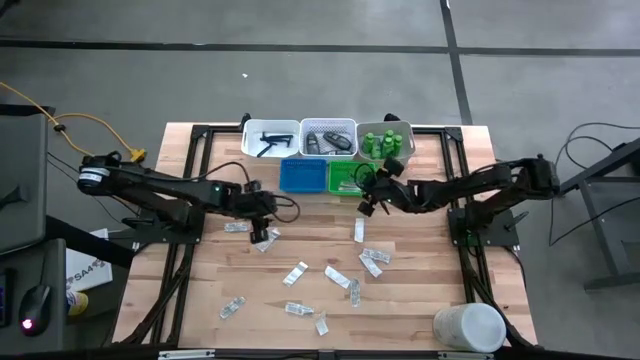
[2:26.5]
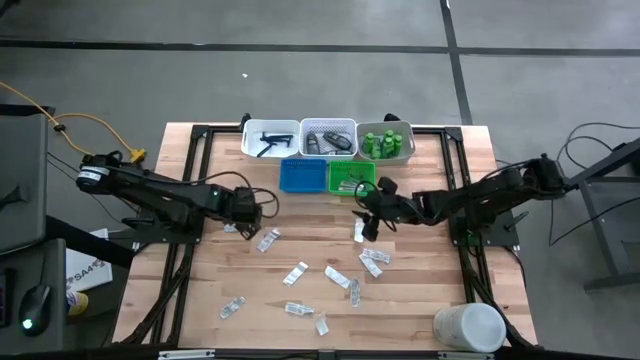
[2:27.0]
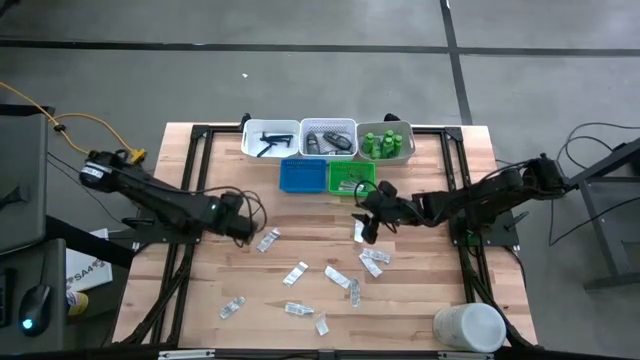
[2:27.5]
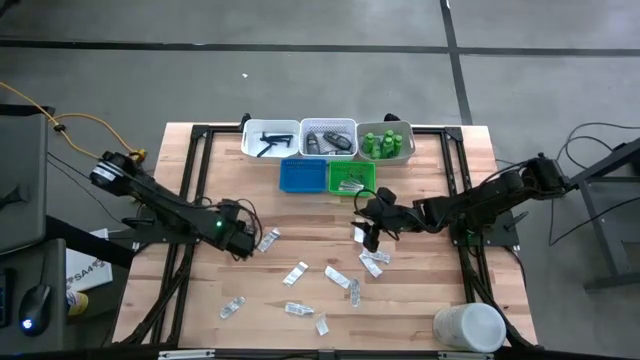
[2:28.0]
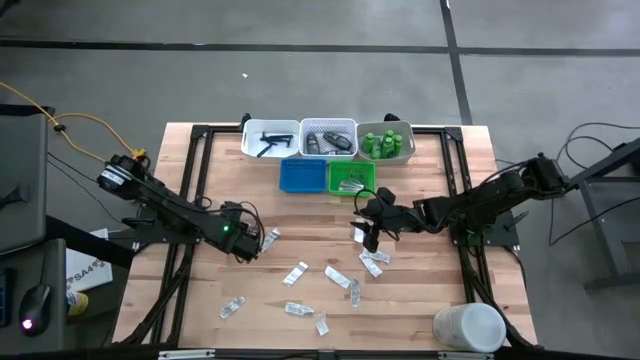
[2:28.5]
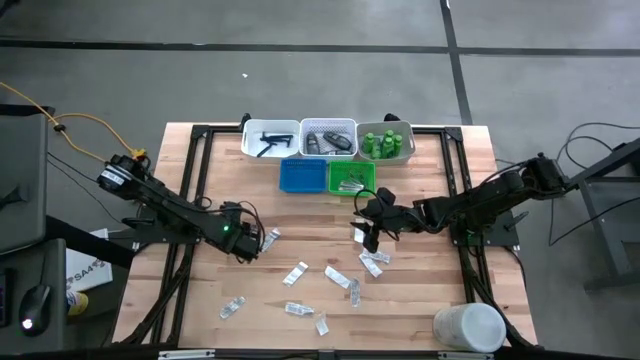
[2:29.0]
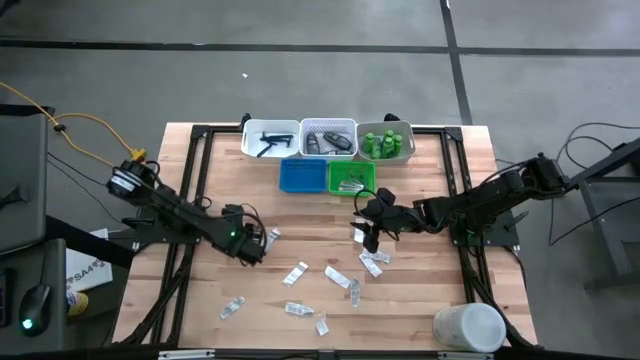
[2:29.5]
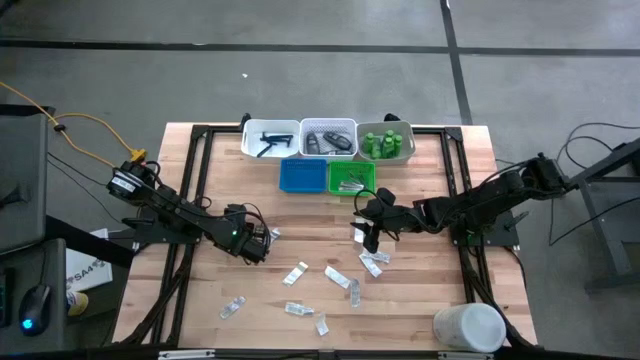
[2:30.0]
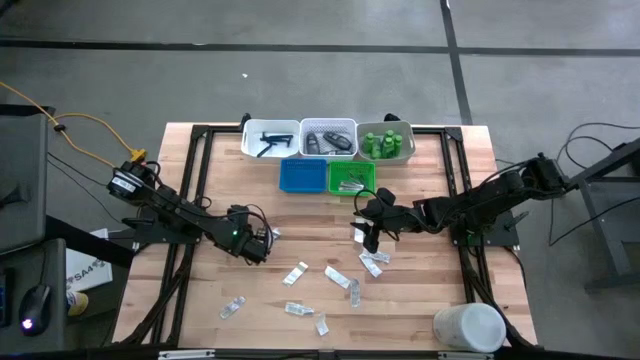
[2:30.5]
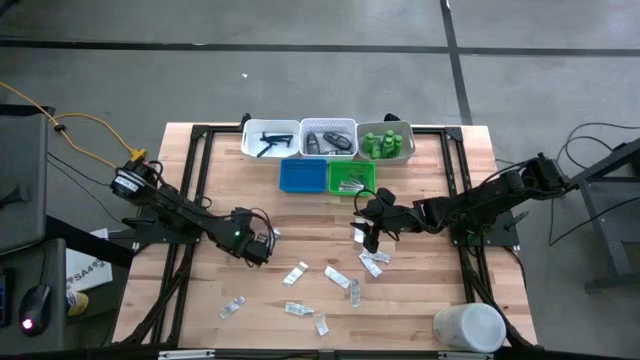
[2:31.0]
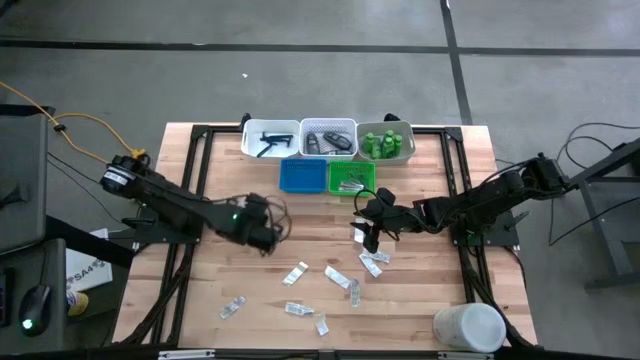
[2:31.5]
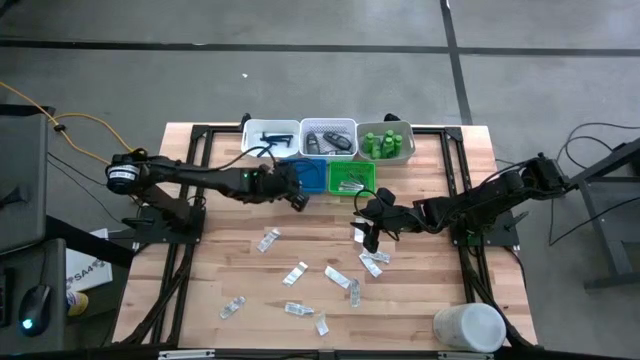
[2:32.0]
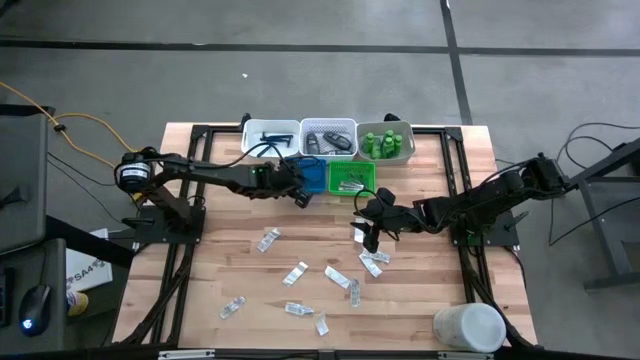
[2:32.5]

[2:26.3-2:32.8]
Task: Pick & Place Travel size toiletries
Put the white bandage pad into the blue basket

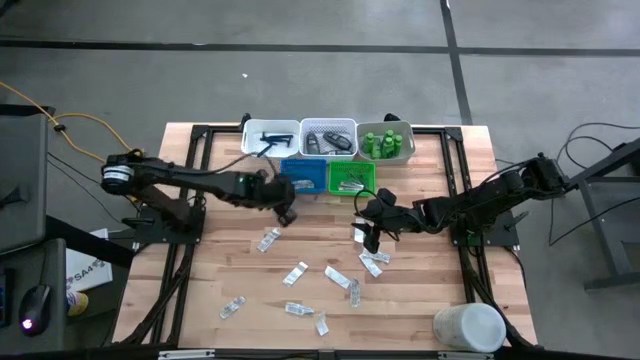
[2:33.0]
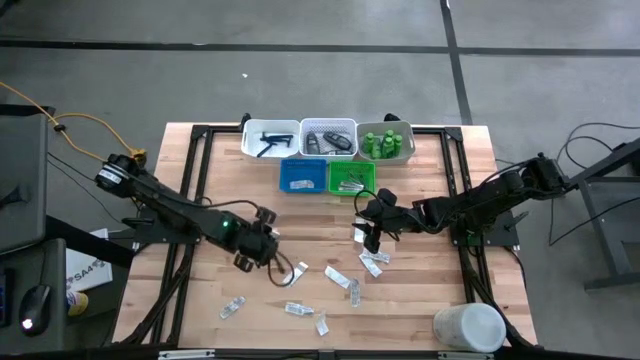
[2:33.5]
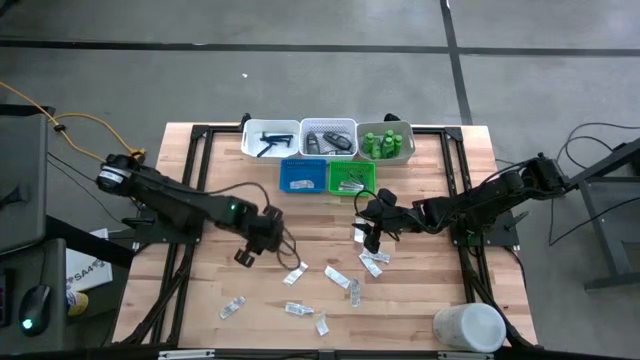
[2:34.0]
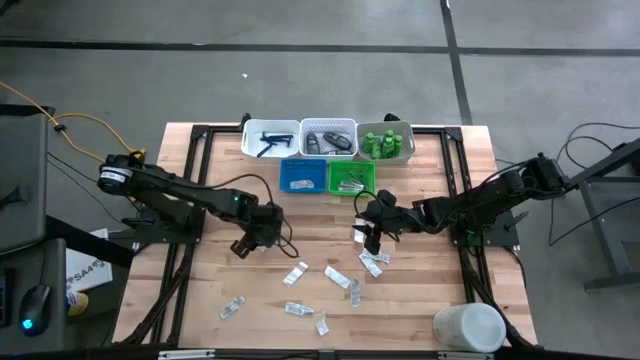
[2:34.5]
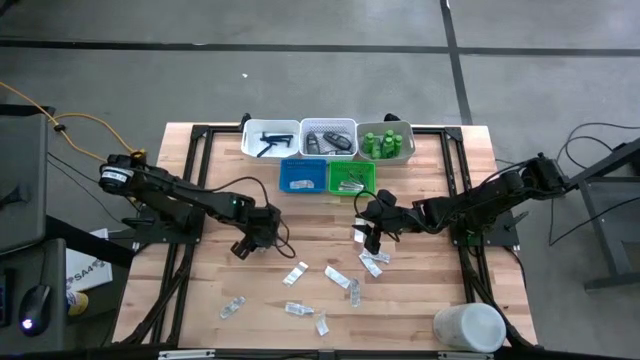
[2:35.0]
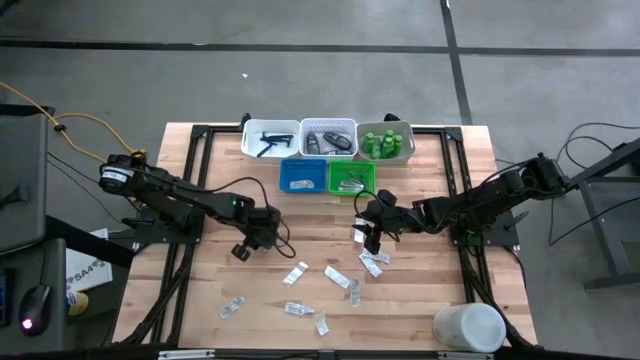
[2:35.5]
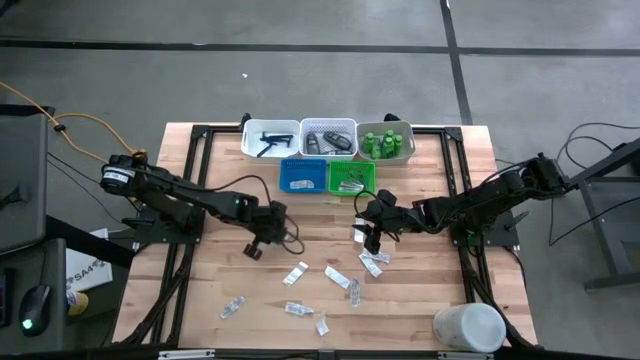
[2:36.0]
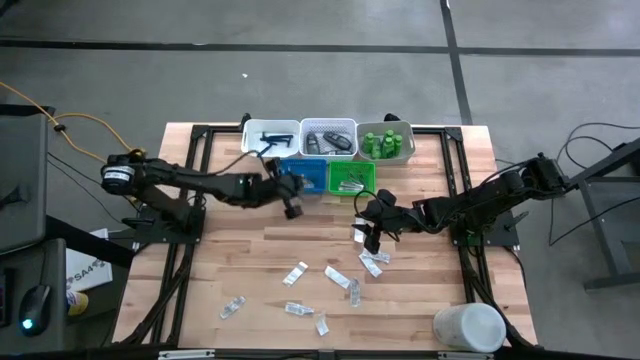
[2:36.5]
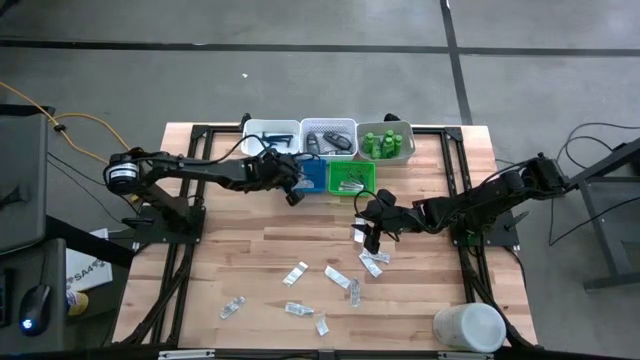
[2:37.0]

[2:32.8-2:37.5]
Put the white bandage pad into the blue basket

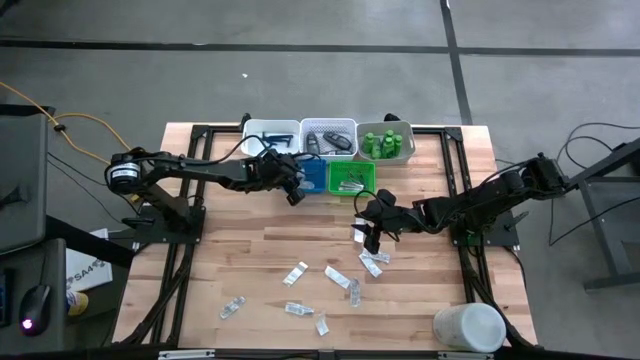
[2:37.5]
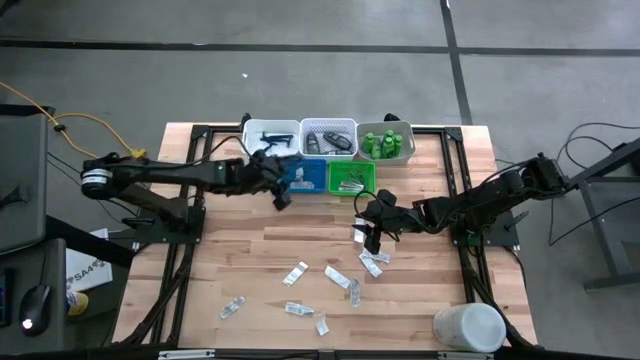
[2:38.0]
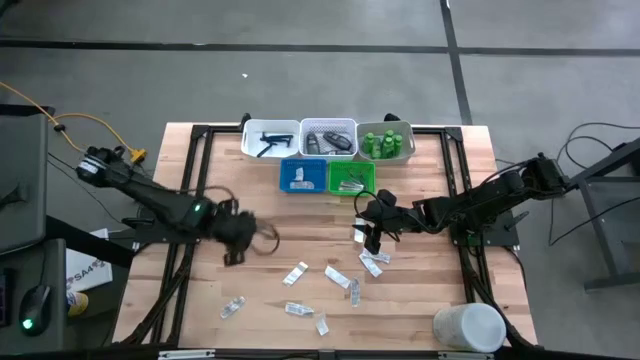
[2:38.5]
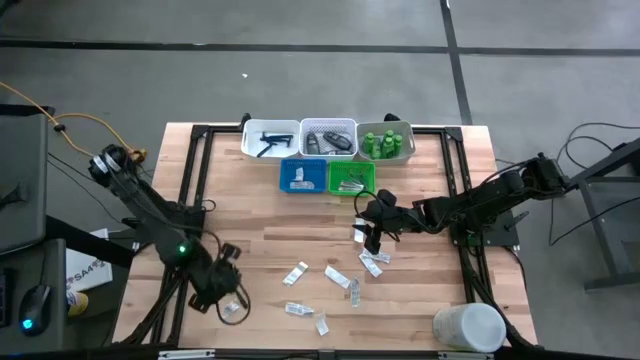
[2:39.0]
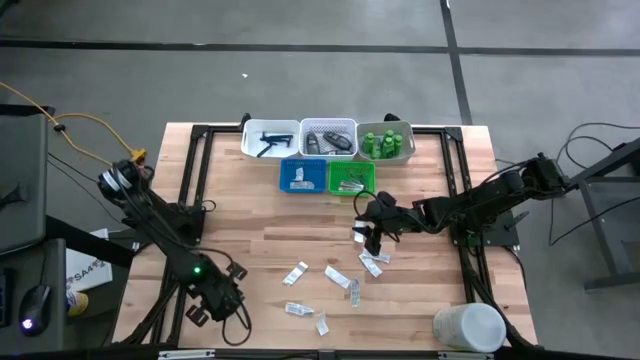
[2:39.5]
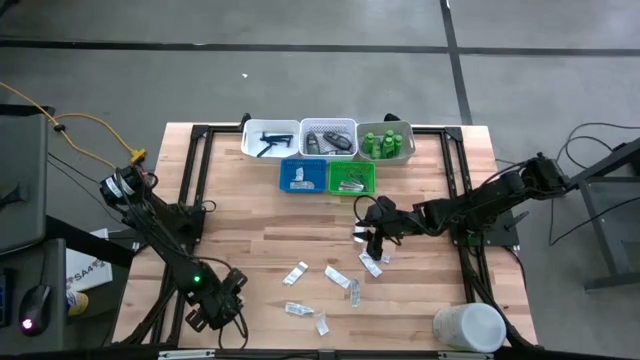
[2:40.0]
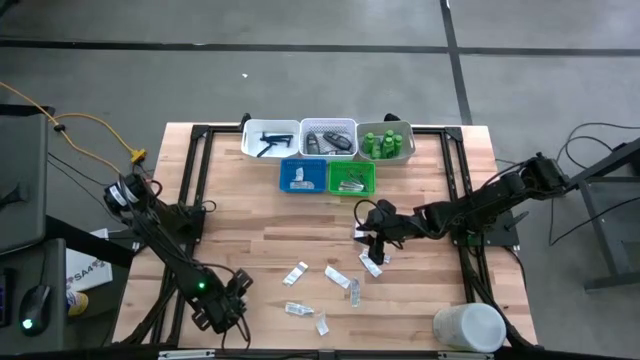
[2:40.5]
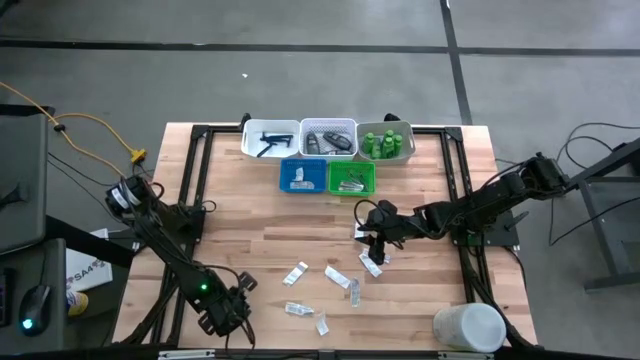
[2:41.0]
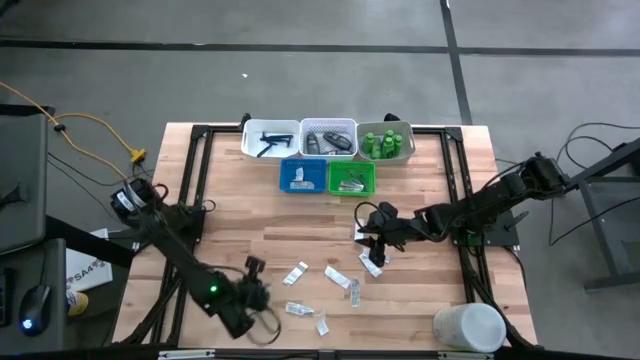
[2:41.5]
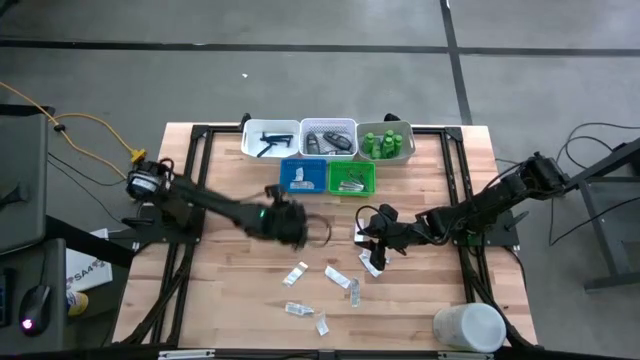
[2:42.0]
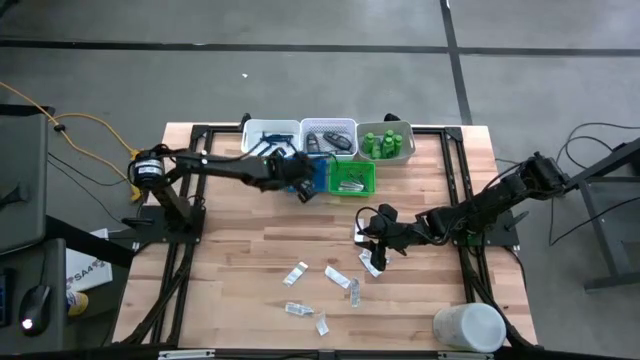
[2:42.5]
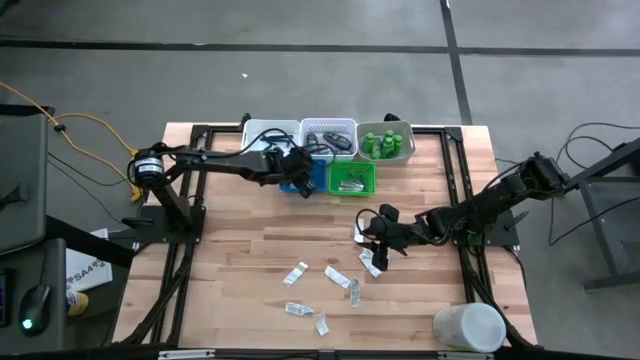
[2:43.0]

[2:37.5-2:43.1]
Put the white bandage pad into the blue basket

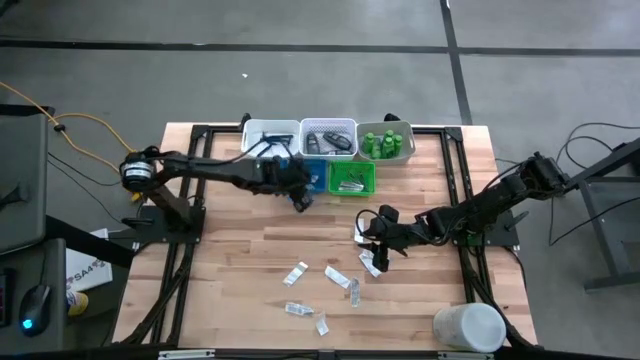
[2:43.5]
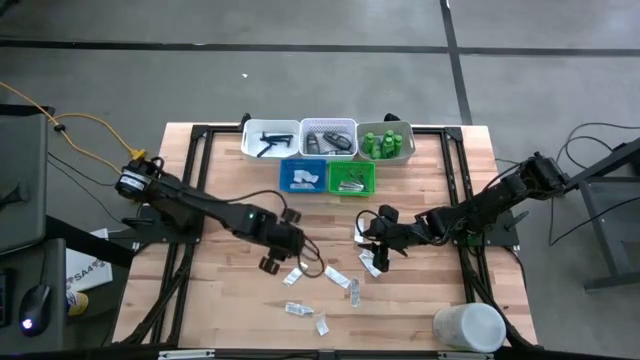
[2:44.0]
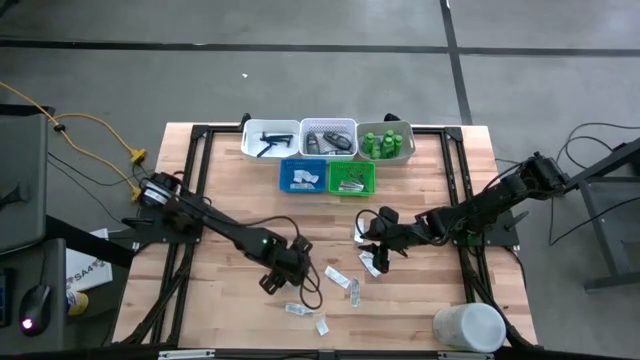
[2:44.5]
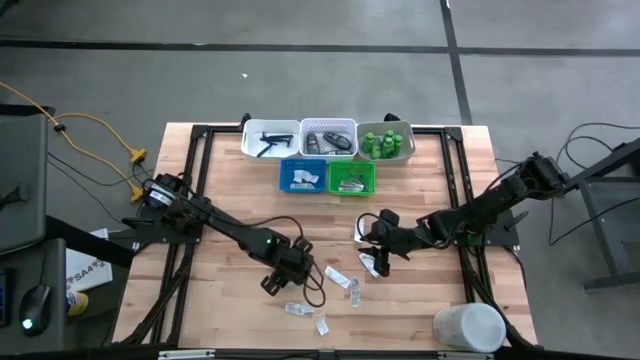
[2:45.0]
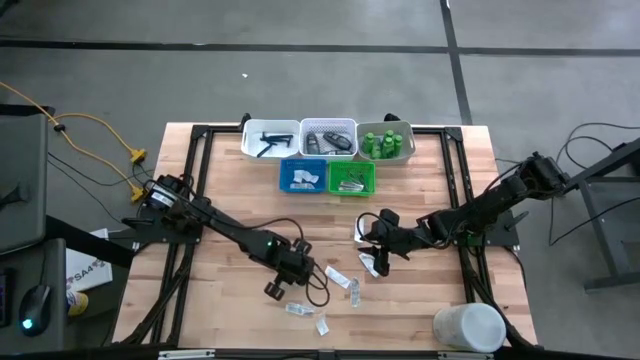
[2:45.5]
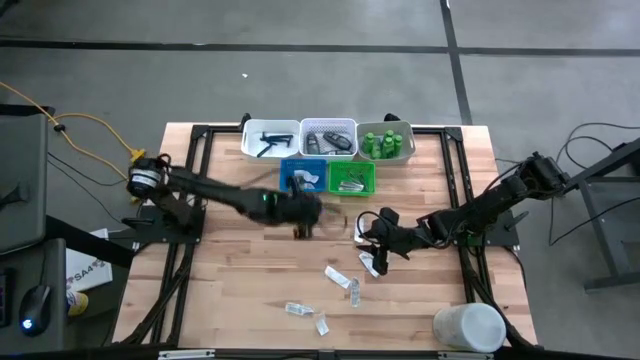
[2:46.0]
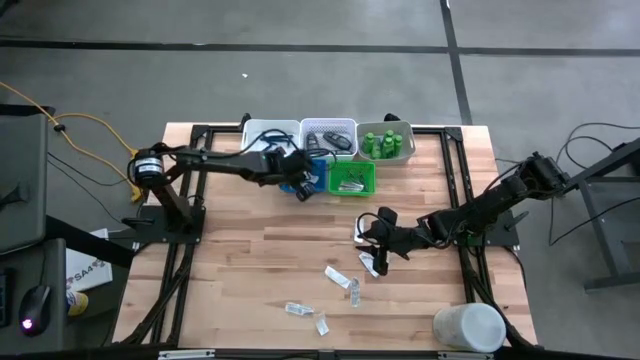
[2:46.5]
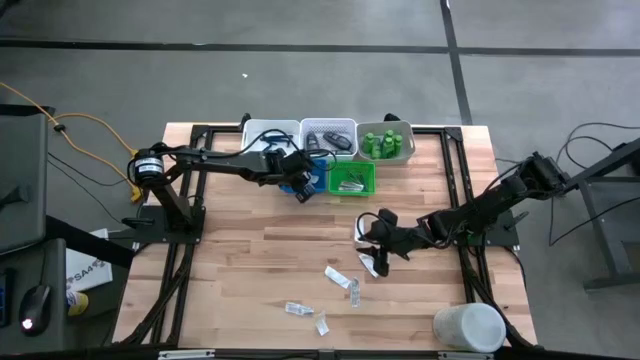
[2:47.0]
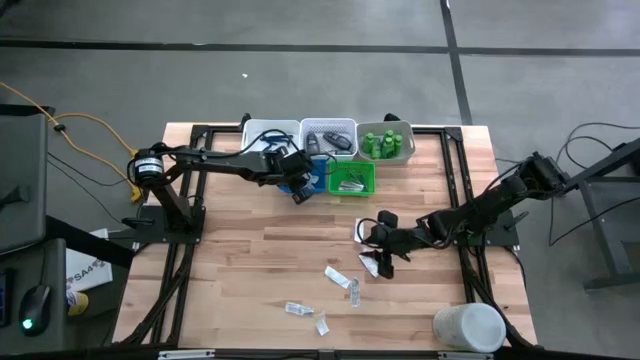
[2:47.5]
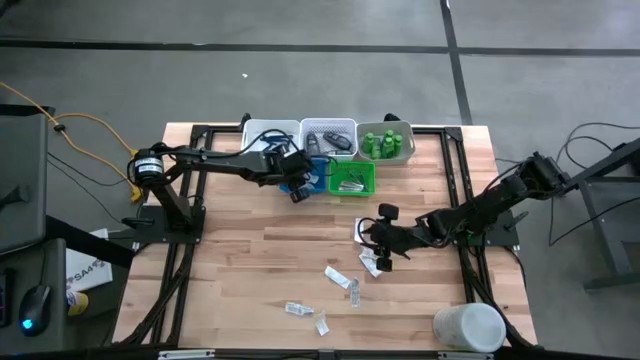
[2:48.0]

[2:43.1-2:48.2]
Put the white bandage pad into the blue basket
